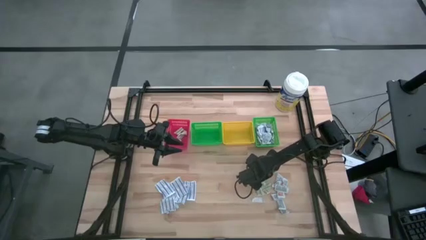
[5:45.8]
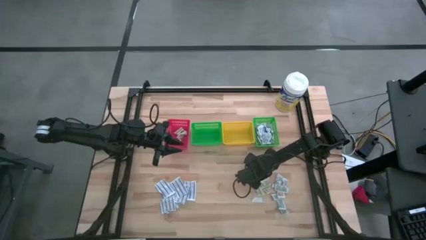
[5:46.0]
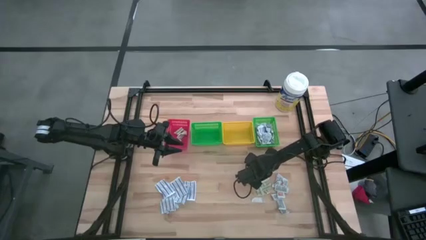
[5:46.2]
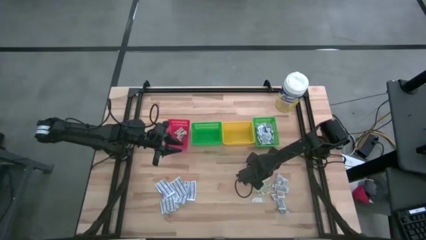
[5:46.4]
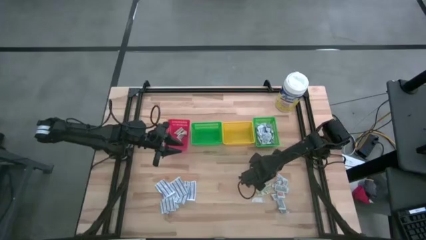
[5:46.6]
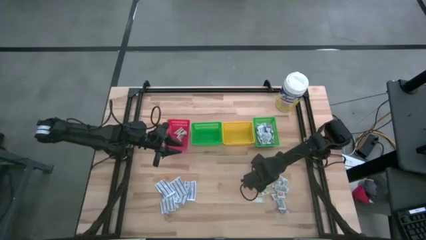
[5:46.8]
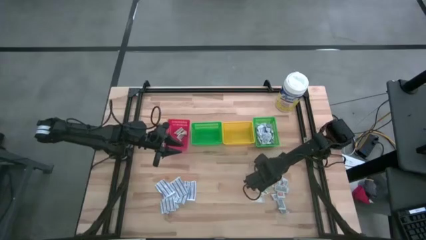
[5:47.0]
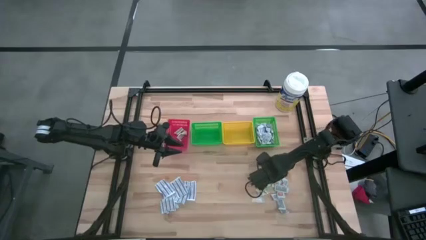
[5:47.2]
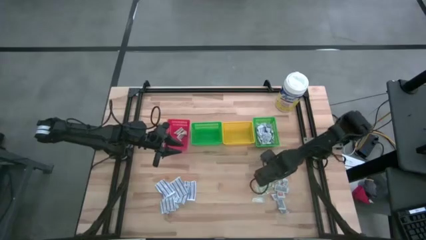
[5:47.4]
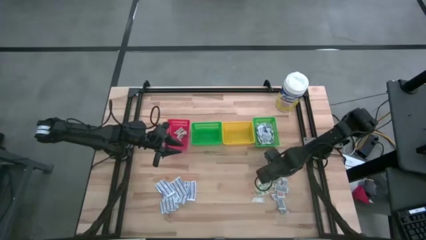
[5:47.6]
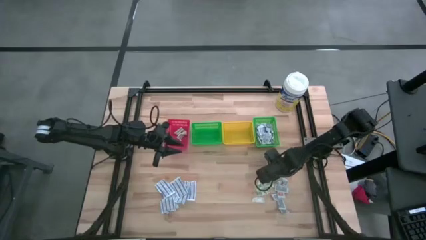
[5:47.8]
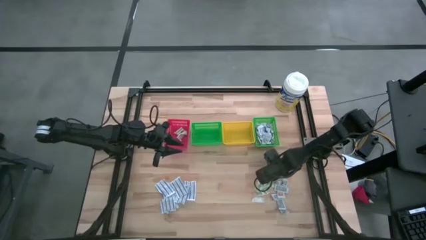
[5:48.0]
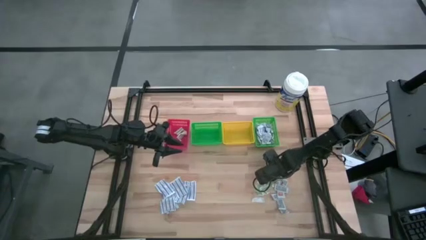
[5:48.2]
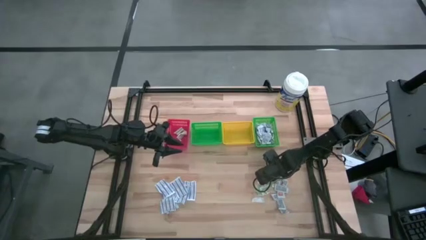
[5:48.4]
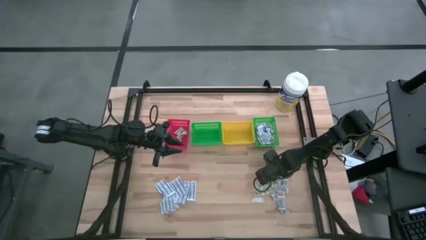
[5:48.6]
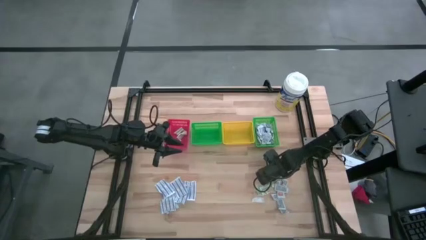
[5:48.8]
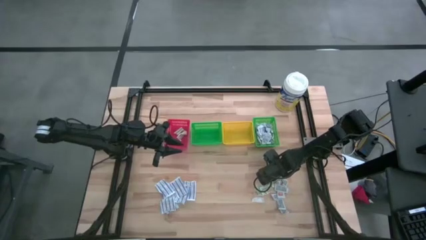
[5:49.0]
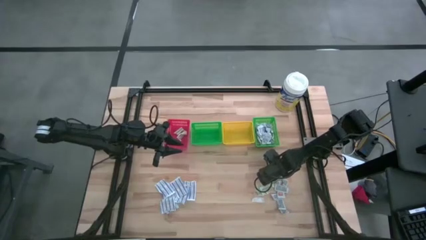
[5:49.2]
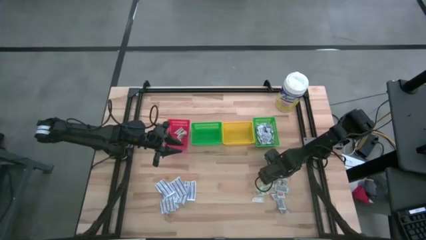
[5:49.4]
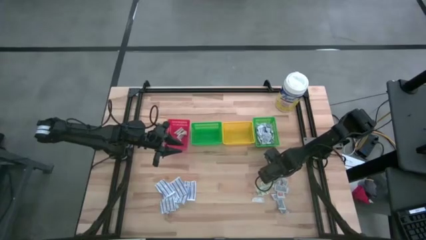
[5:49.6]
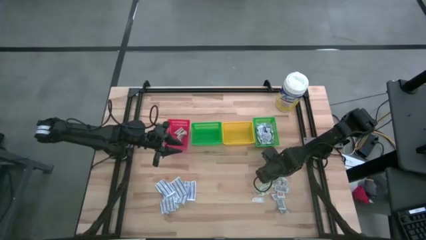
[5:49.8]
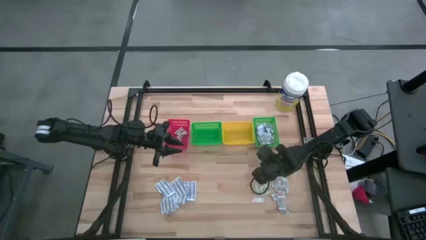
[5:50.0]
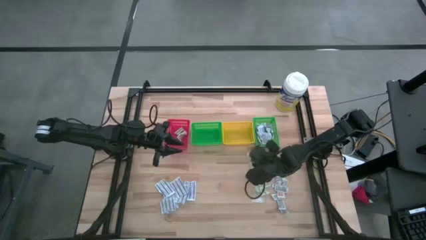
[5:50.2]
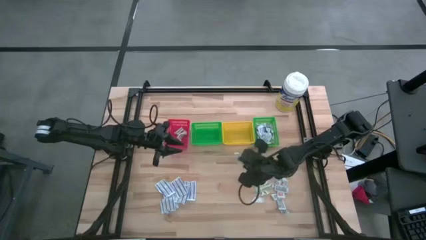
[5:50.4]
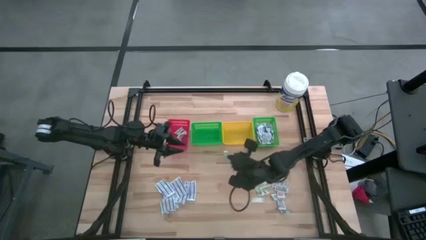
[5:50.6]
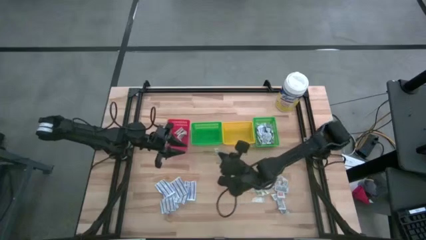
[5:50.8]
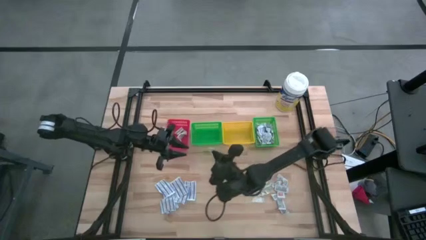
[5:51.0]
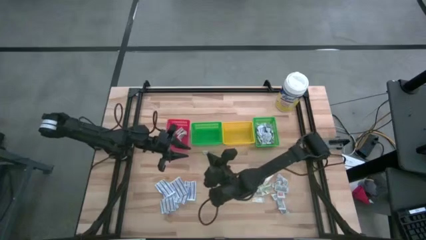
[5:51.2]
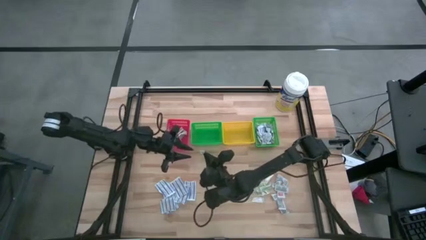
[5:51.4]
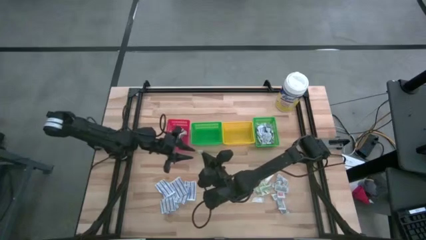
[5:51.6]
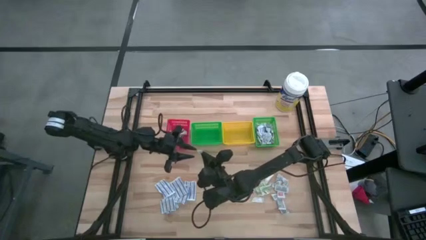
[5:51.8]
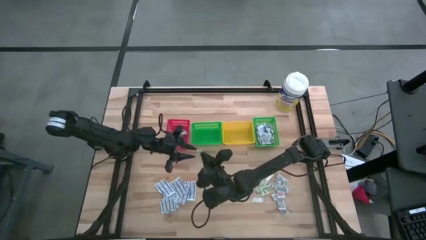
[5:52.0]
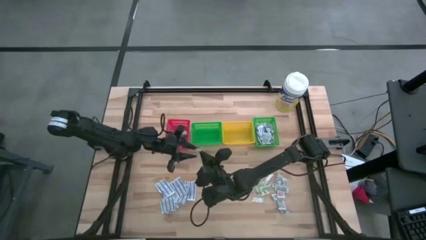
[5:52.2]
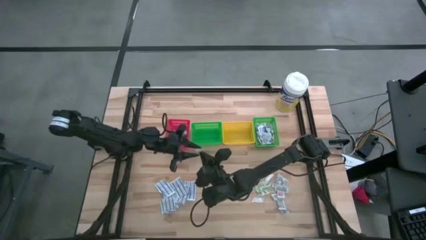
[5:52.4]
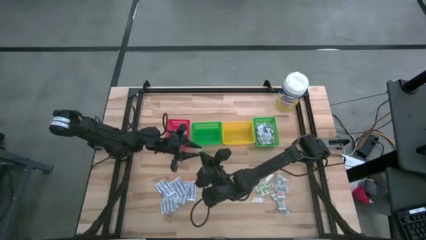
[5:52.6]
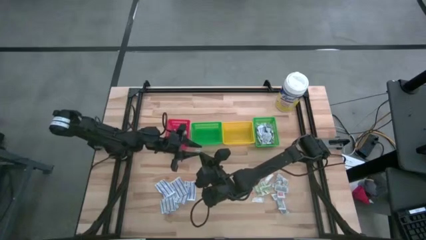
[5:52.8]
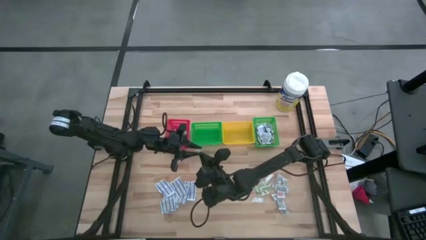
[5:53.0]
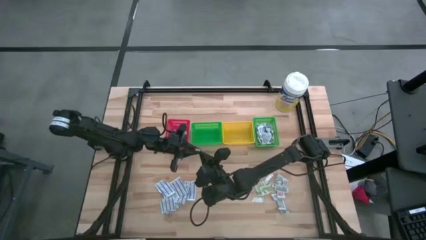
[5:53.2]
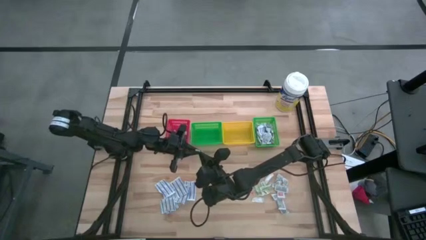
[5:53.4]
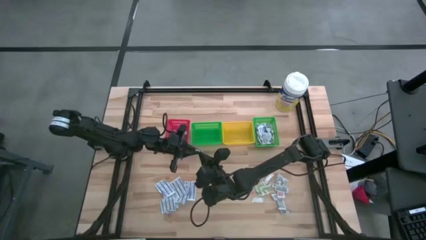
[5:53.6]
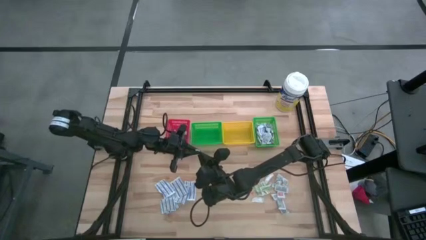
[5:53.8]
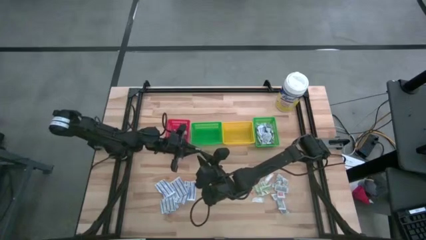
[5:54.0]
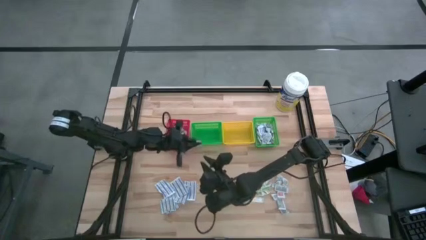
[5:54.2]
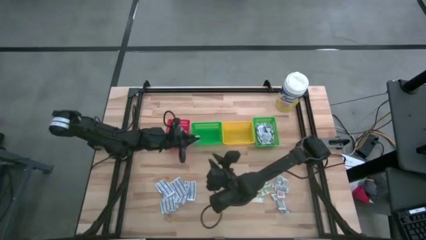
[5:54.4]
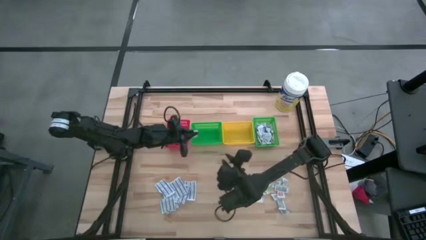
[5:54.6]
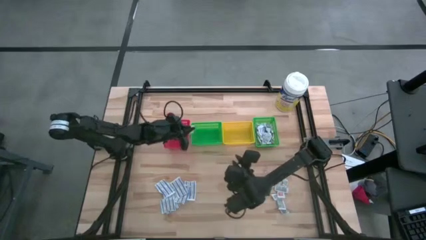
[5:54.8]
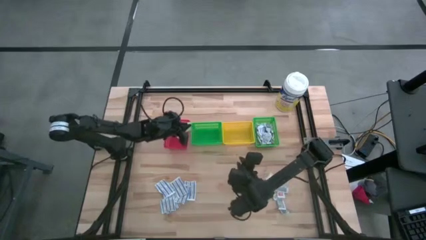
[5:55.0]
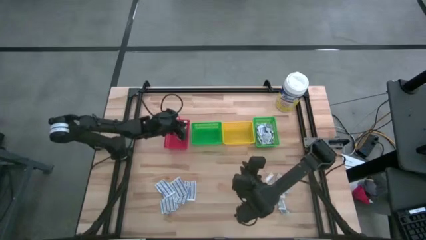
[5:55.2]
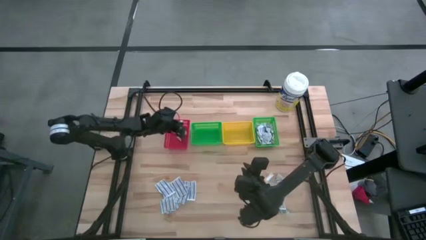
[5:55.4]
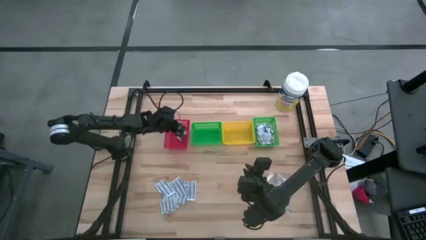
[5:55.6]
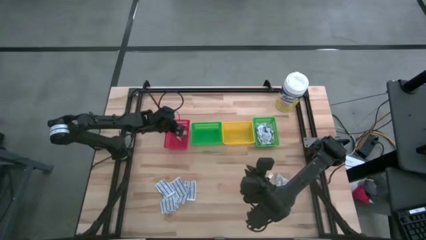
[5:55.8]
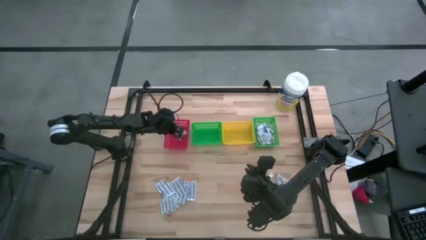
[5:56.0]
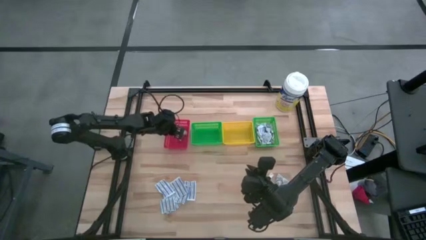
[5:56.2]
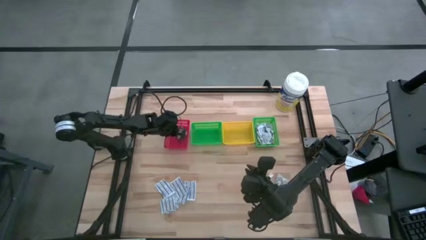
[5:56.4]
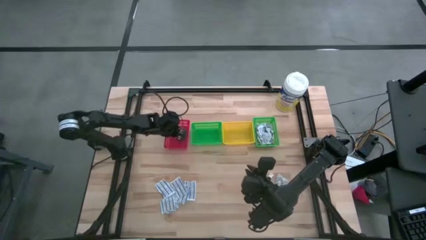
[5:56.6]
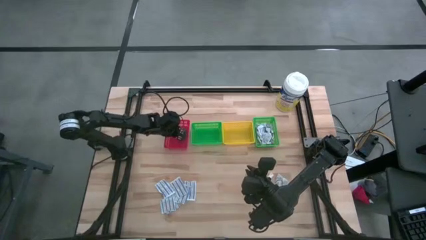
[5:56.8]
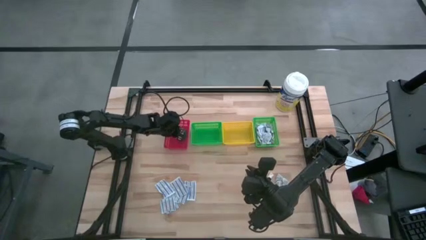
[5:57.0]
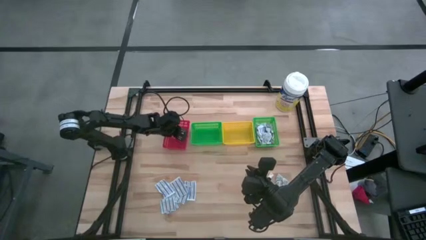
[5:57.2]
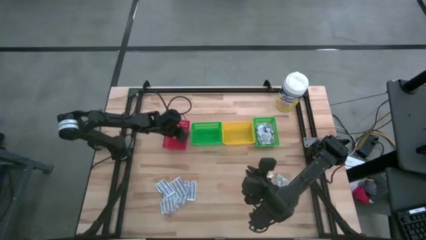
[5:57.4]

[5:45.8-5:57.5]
Task: Pick & Place First Aid Supplies
Put the green bandage into the red bin
